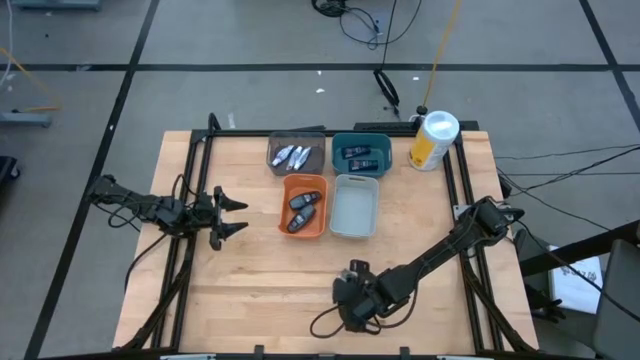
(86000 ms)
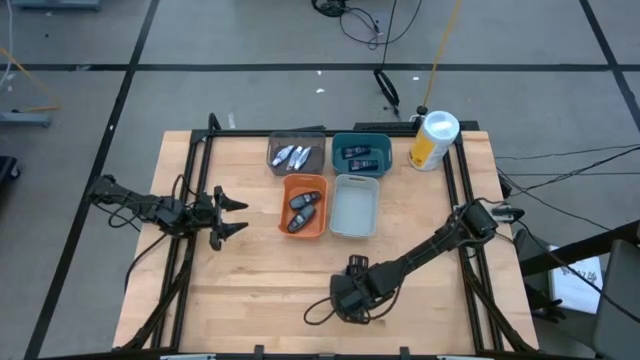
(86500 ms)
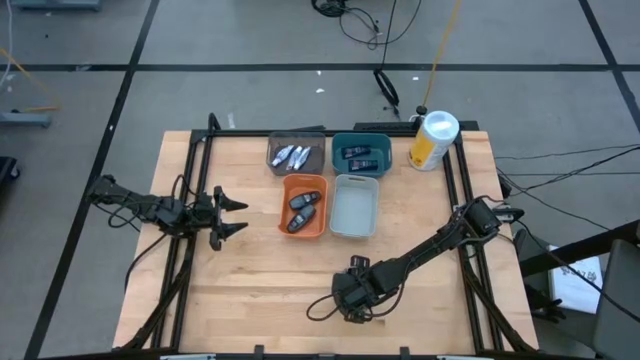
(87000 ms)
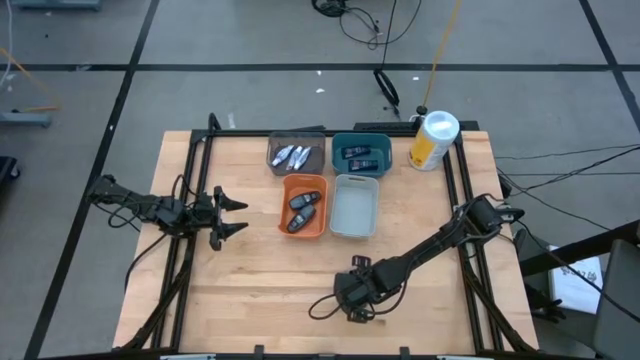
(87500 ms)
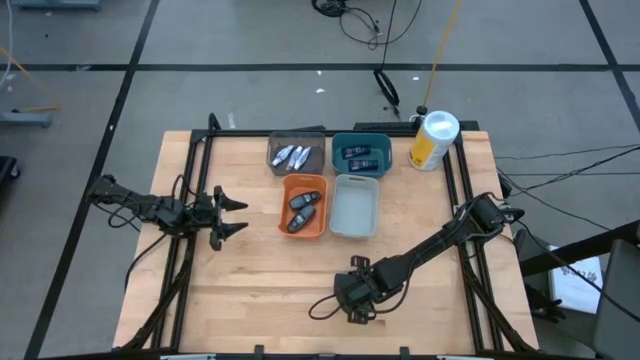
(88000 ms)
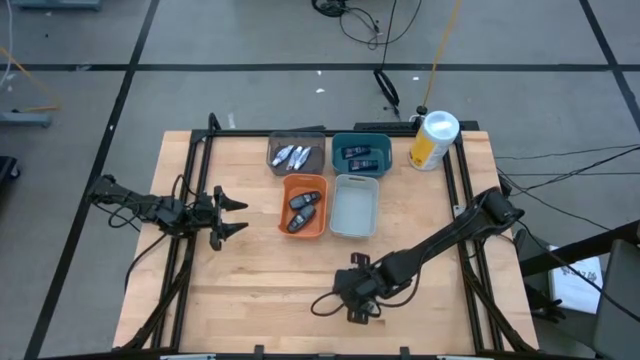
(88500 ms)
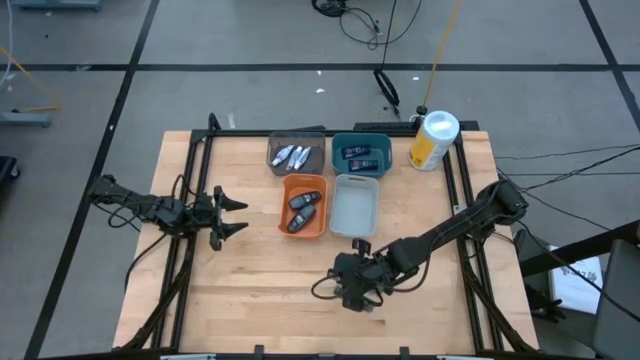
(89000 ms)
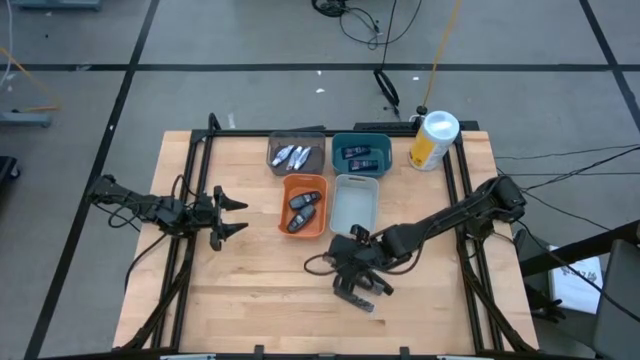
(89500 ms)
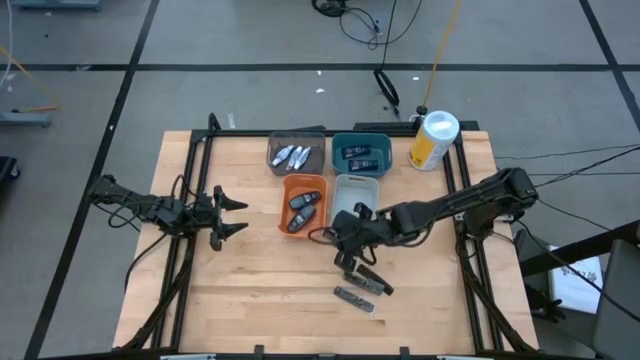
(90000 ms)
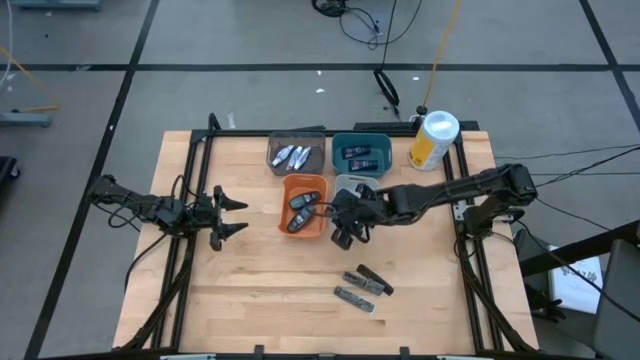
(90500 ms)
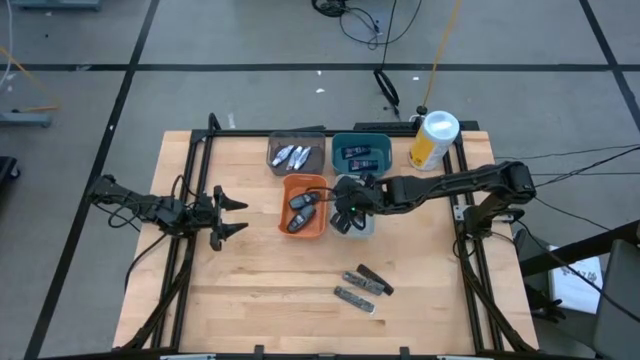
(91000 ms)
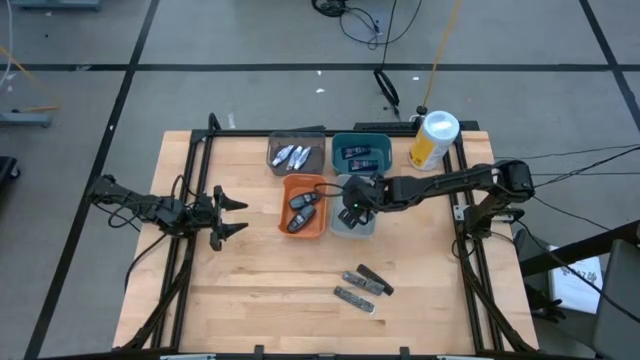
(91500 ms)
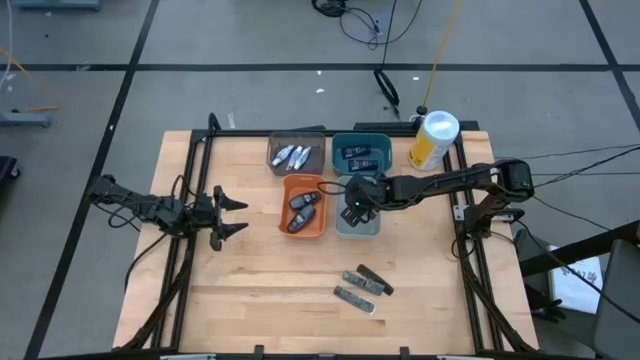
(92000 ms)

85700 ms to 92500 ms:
Task: Pick & Place Travel size toiletries
Put the black comb into the gray bin

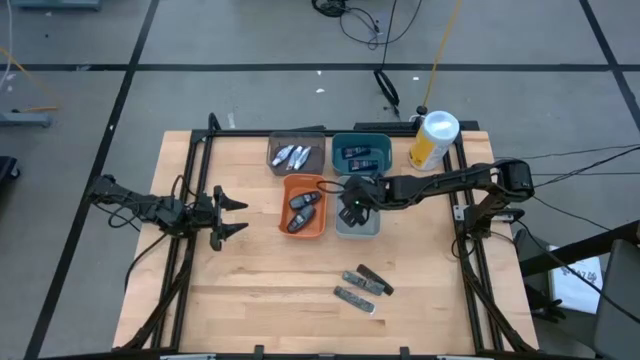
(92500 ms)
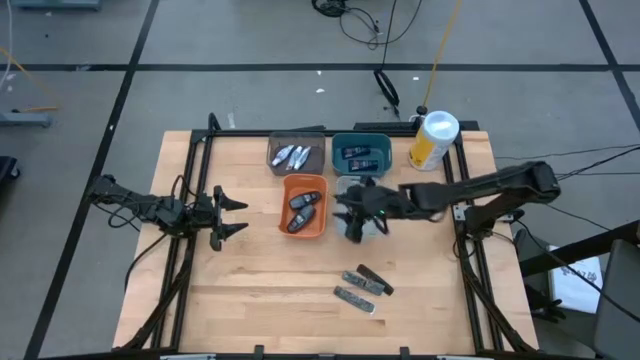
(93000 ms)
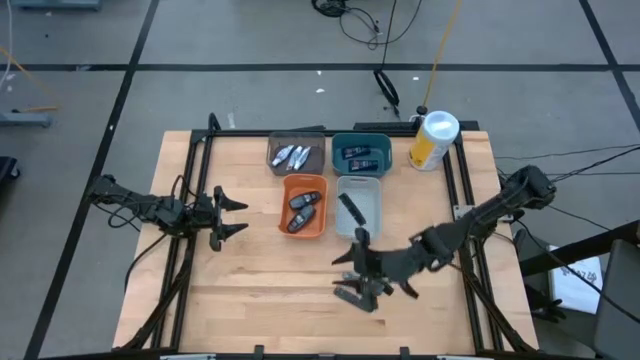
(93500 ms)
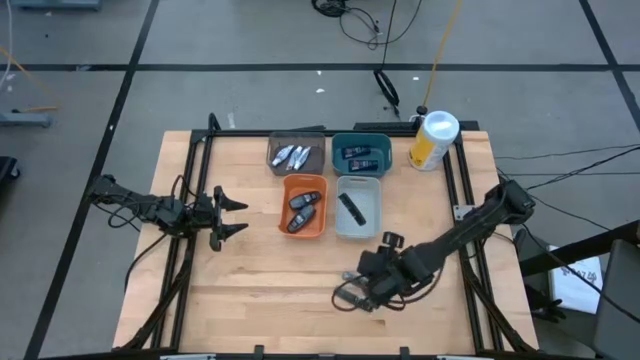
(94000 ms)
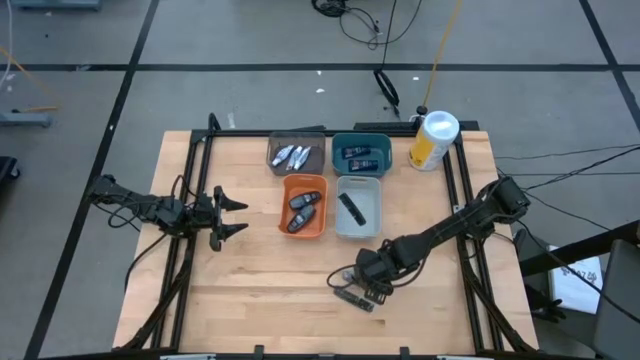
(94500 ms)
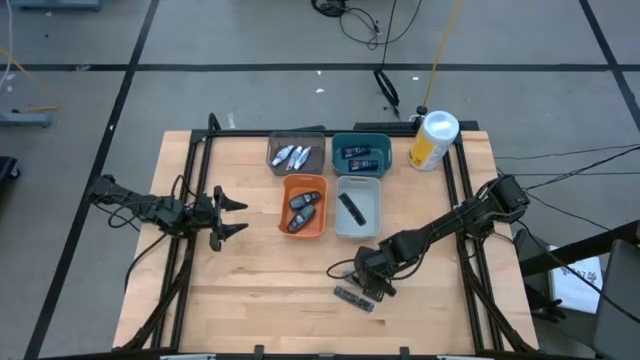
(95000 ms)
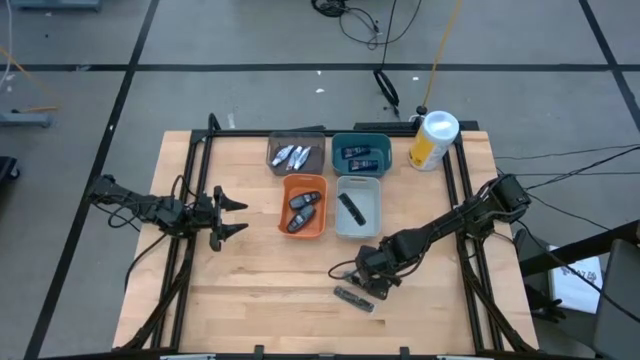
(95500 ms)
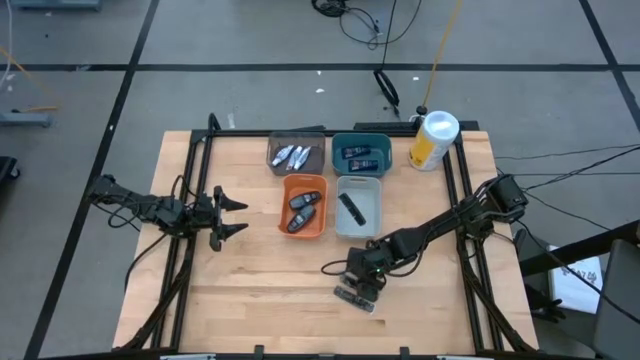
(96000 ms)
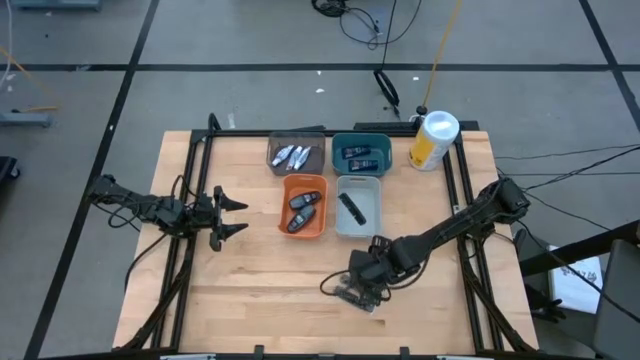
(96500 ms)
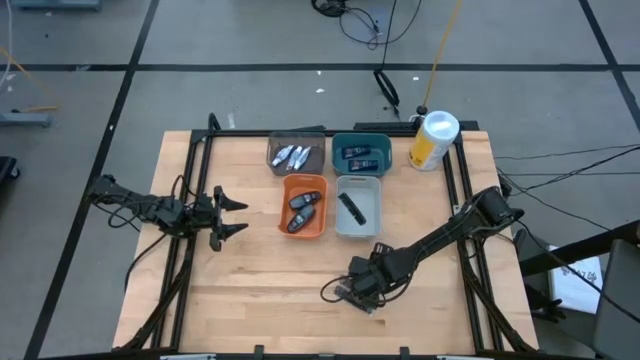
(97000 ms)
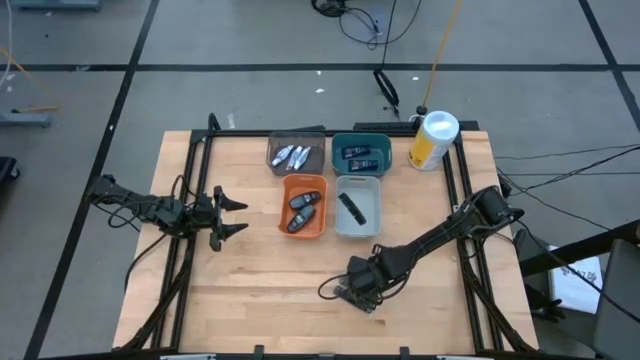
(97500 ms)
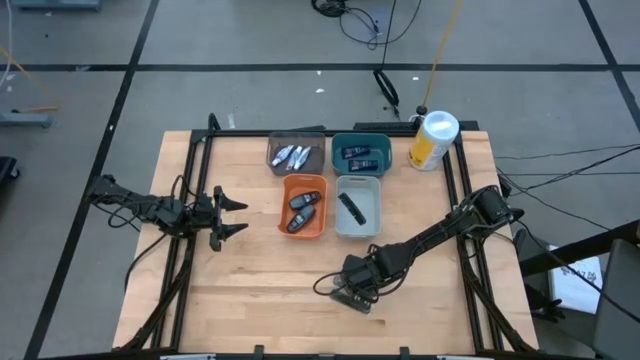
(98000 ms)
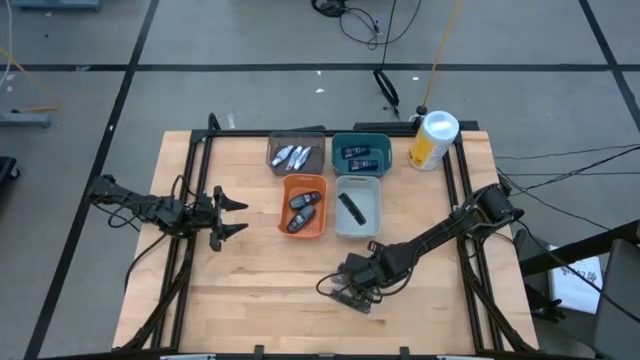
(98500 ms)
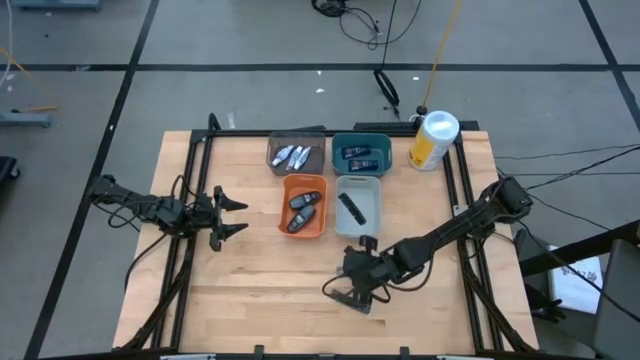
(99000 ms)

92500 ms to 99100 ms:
Put the black comb into the gray bin

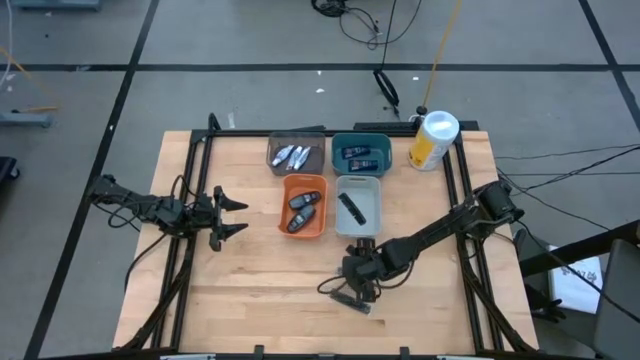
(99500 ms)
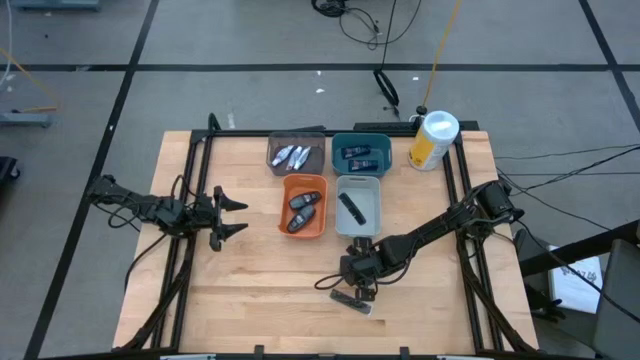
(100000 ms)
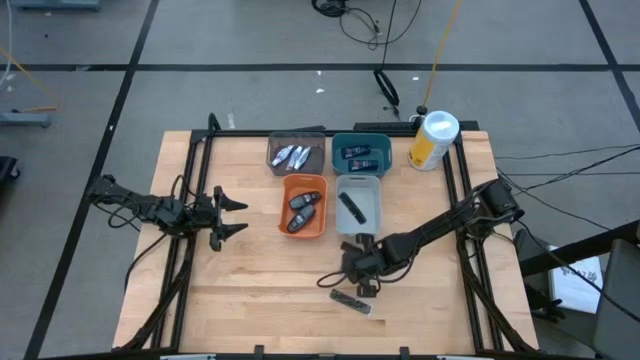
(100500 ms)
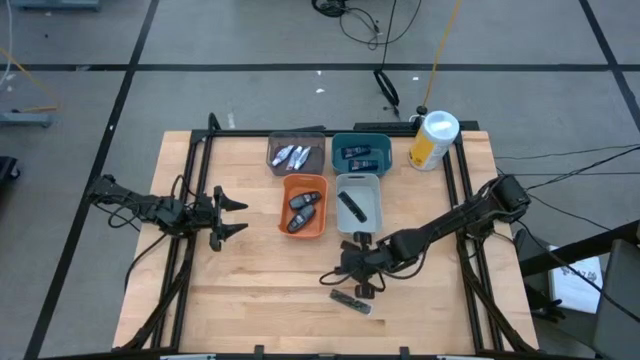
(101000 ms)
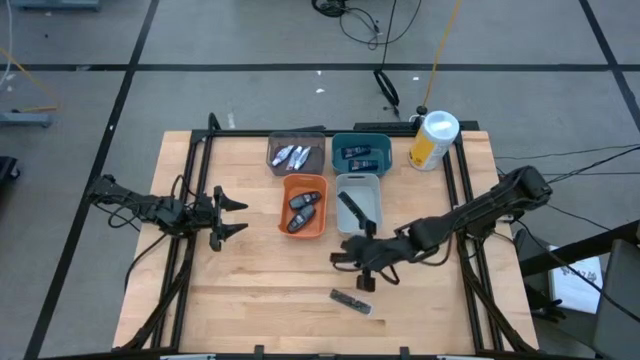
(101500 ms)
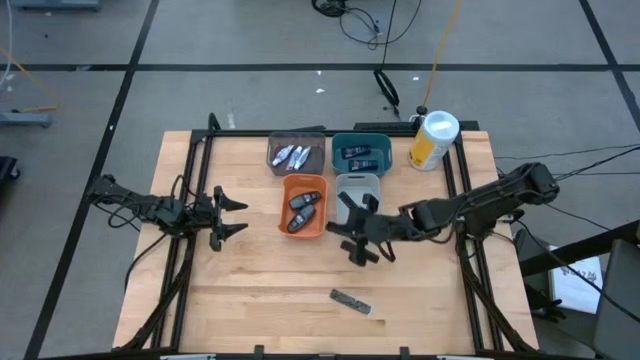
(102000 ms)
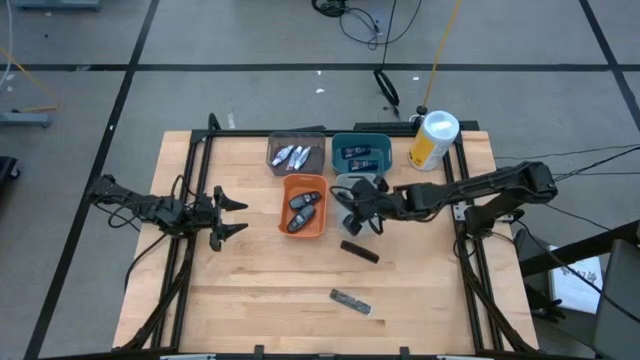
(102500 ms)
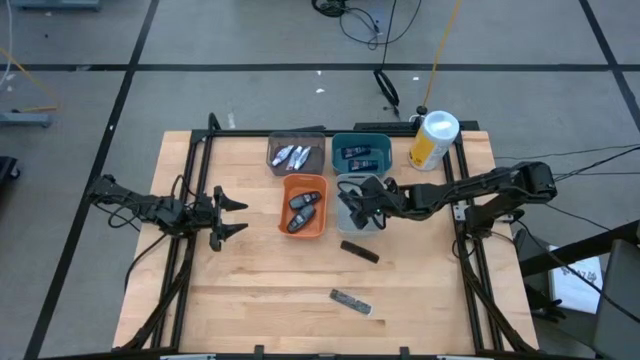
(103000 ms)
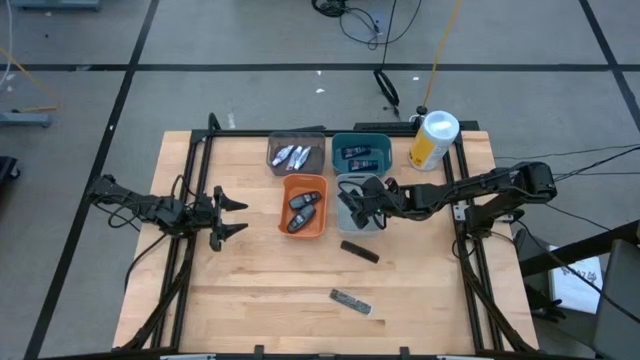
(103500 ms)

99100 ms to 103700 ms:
Put the black comb into the gray bin

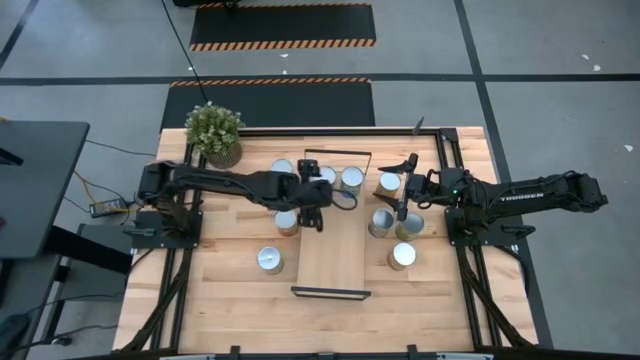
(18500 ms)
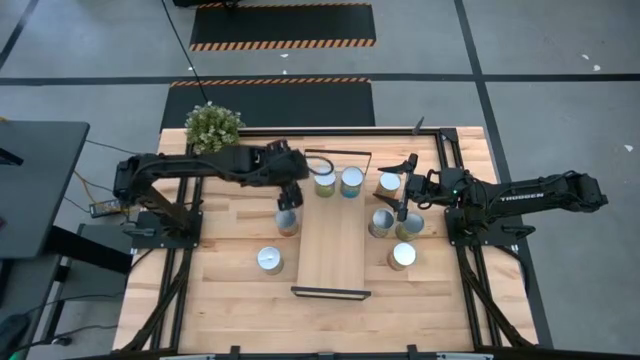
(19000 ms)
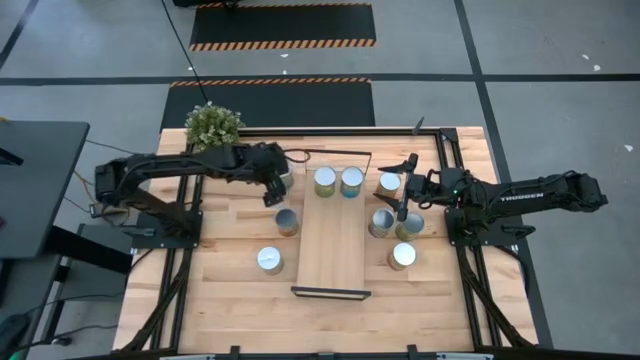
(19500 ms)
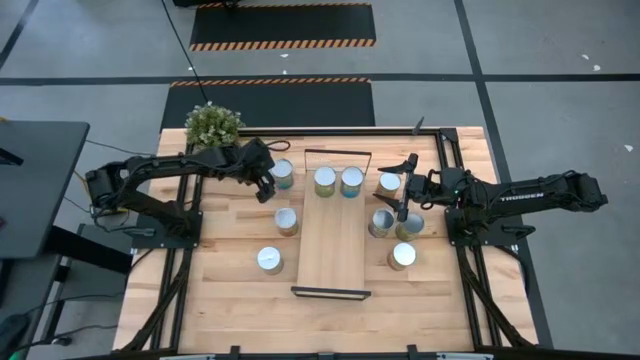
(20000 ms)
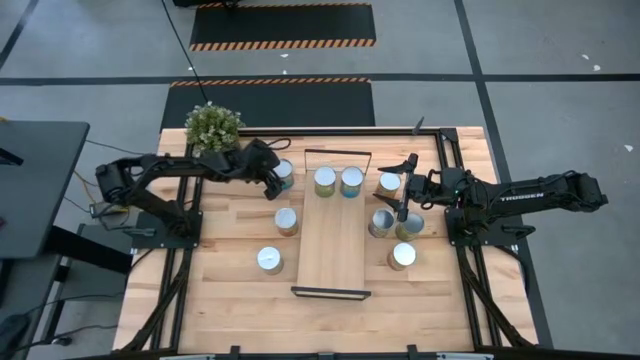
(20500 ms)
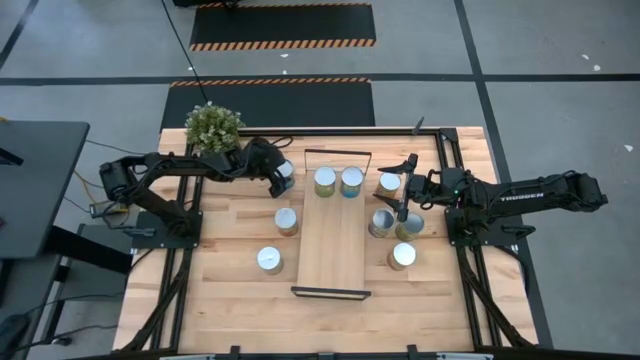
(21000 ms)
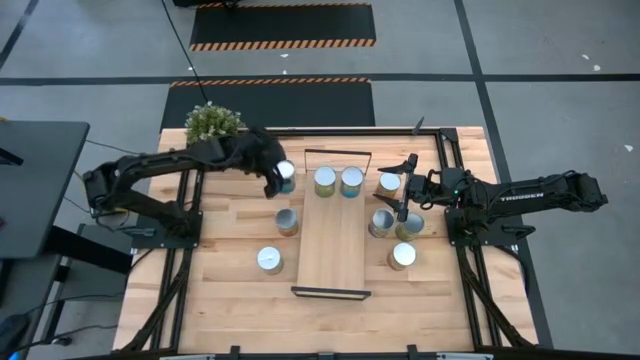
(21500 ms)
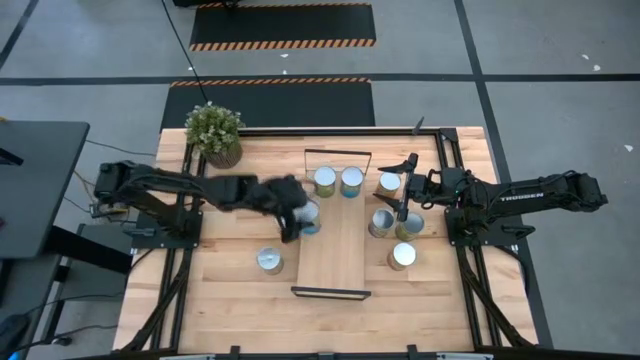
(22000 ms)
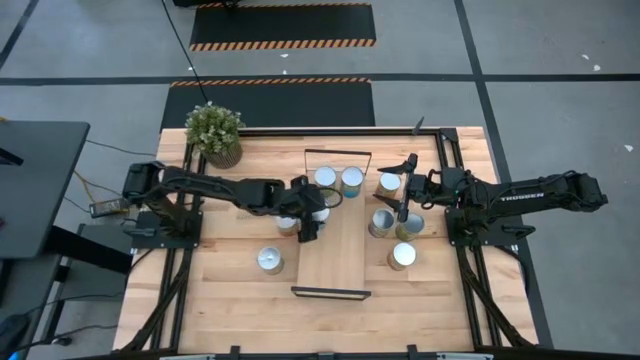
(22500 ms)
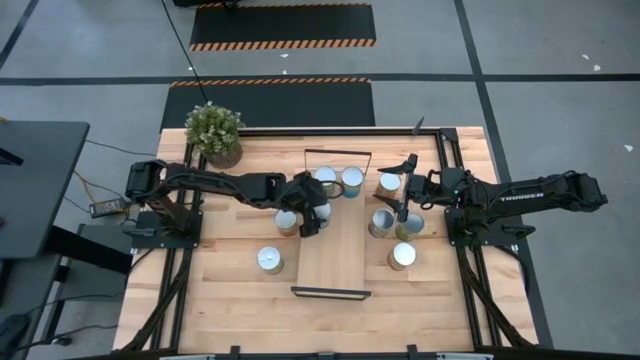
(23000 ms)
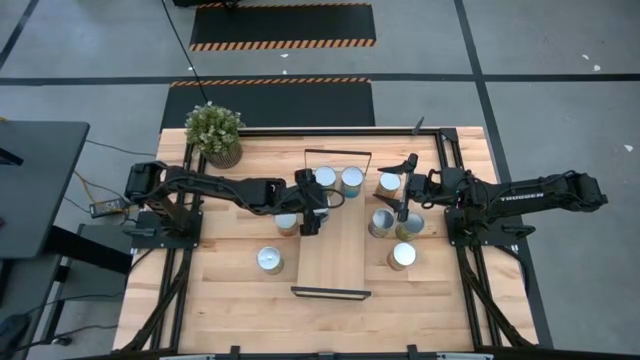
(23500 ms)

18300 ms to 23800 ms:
Task: Pick and place cans onto a shelf
Put the canned tomatoes on the shelf
